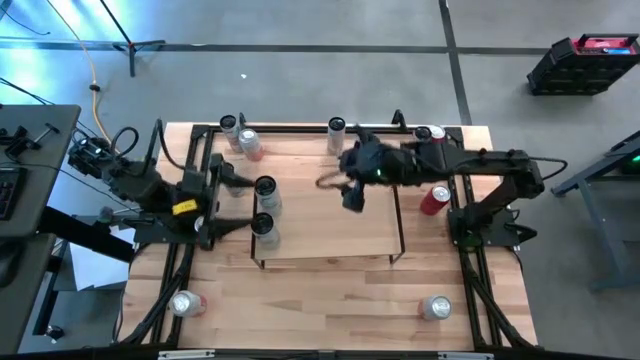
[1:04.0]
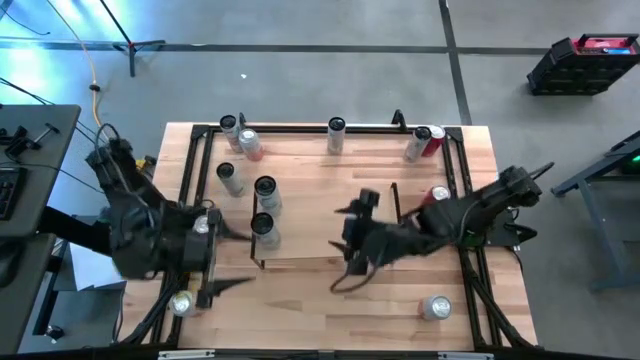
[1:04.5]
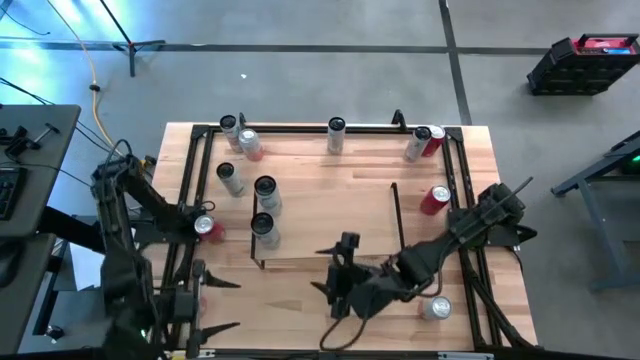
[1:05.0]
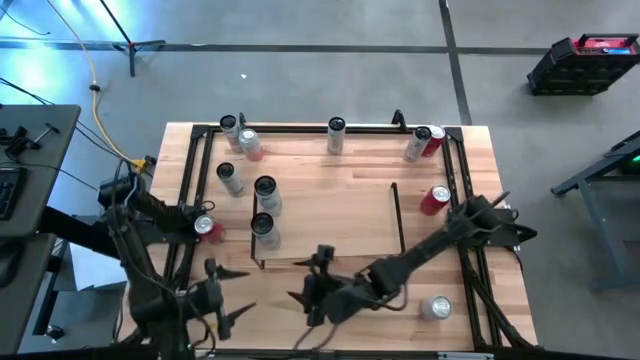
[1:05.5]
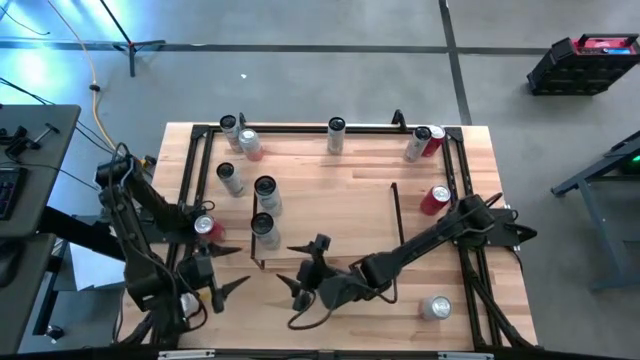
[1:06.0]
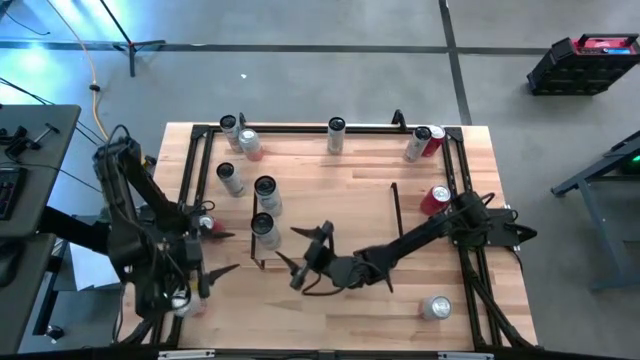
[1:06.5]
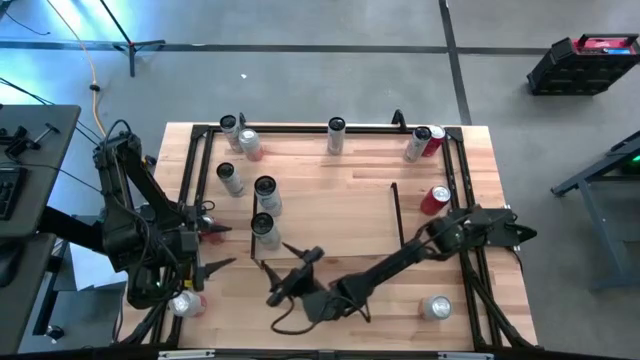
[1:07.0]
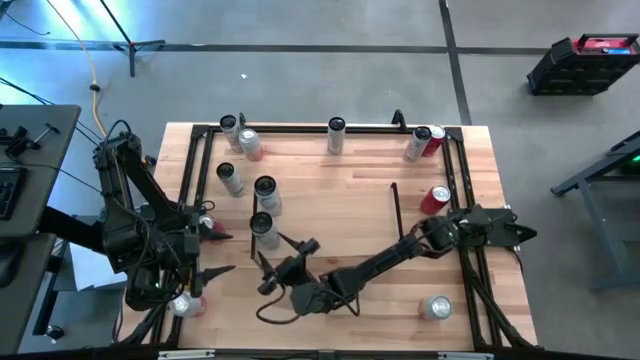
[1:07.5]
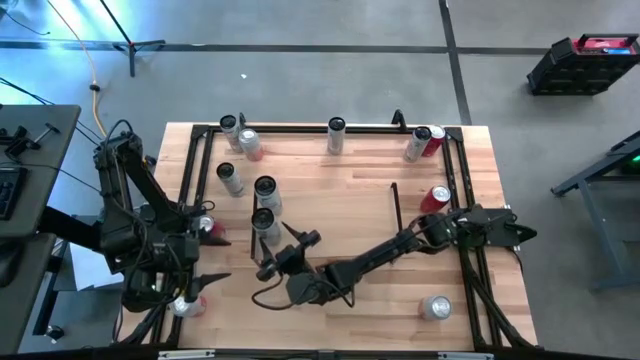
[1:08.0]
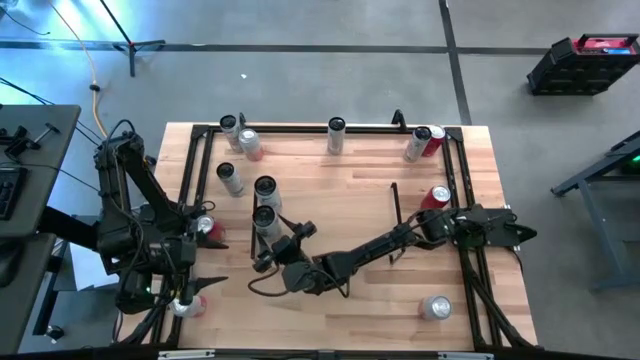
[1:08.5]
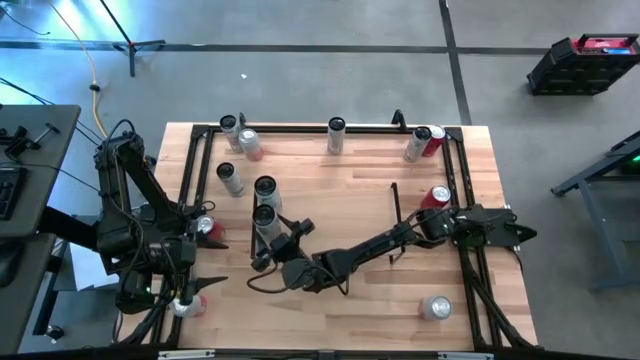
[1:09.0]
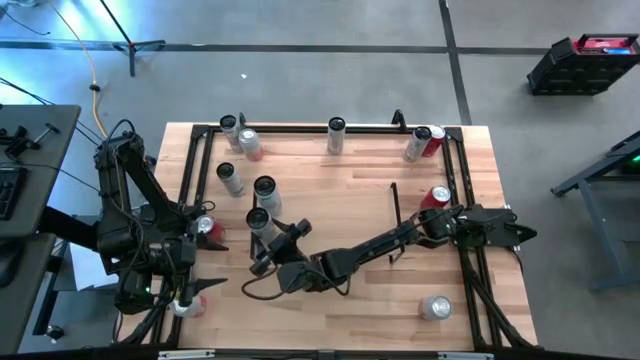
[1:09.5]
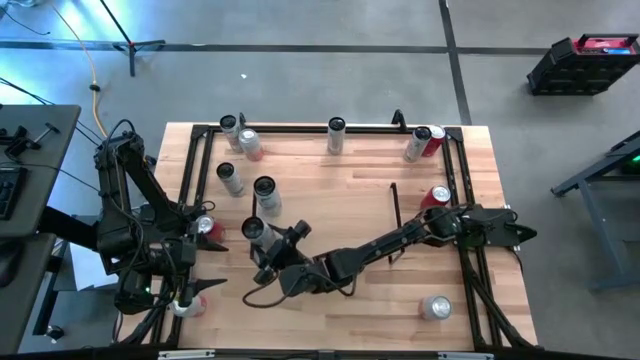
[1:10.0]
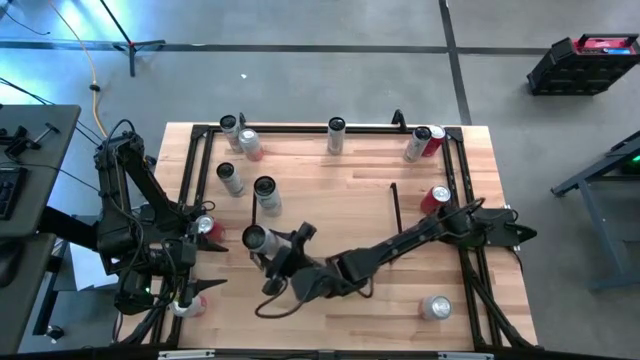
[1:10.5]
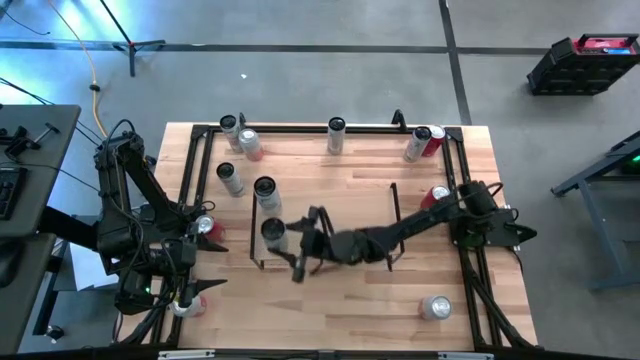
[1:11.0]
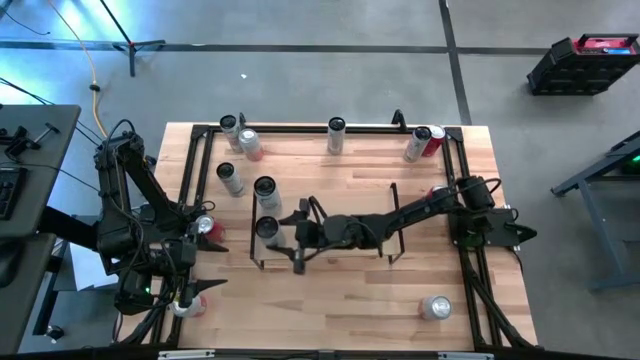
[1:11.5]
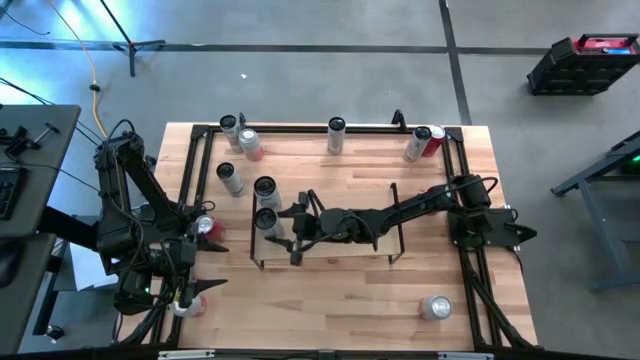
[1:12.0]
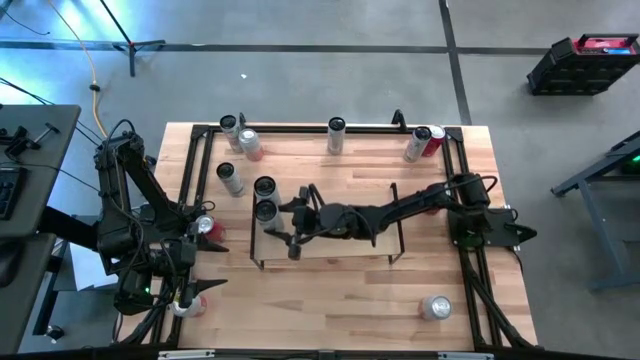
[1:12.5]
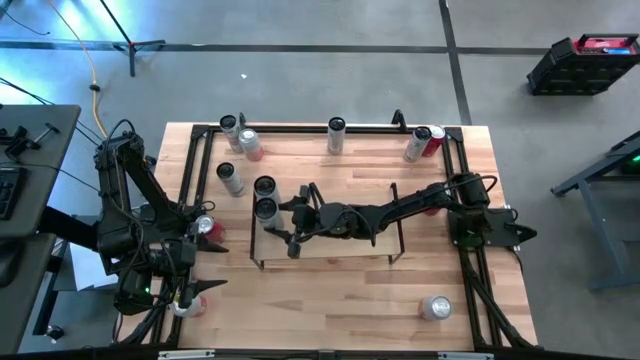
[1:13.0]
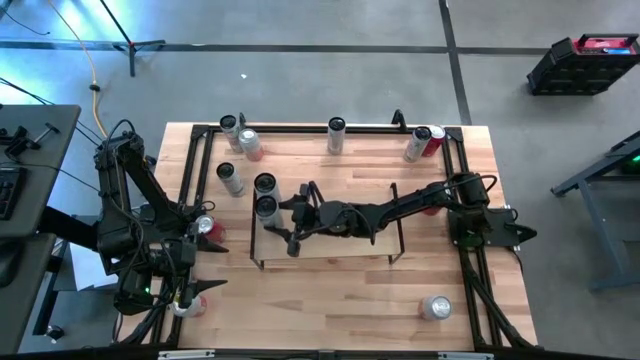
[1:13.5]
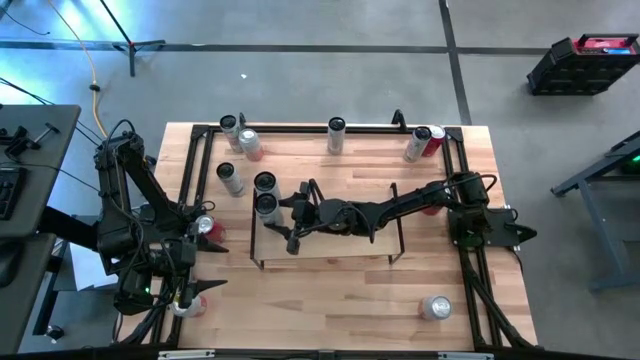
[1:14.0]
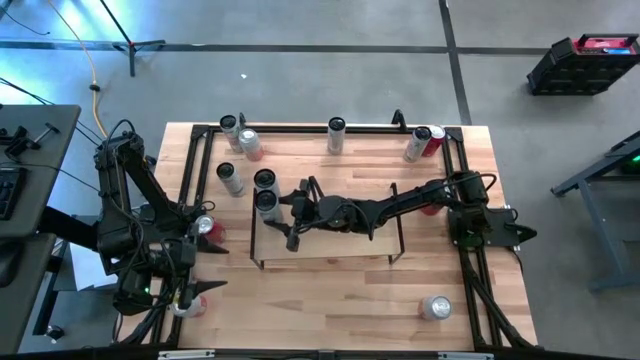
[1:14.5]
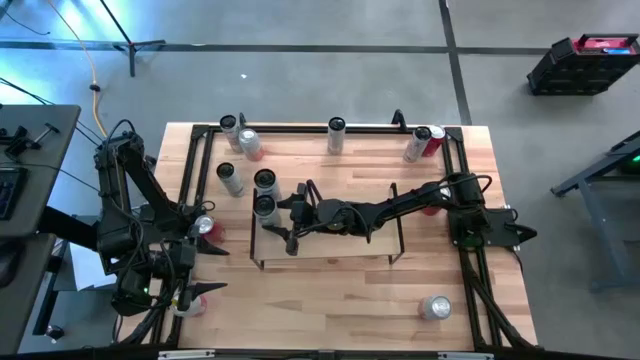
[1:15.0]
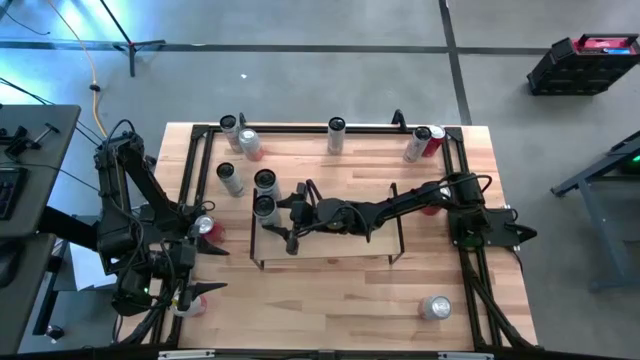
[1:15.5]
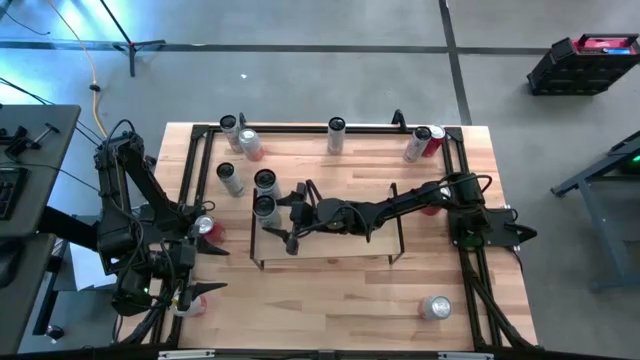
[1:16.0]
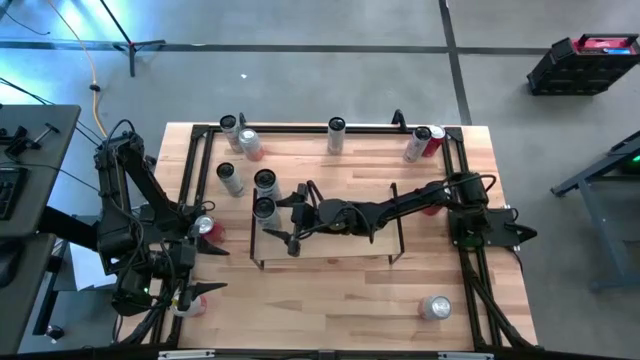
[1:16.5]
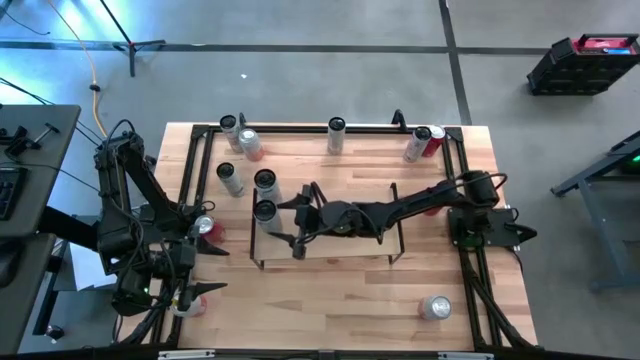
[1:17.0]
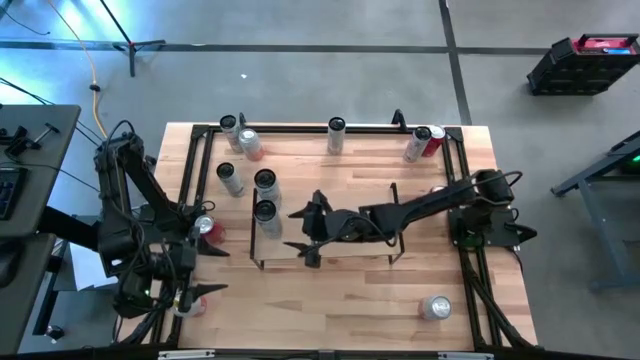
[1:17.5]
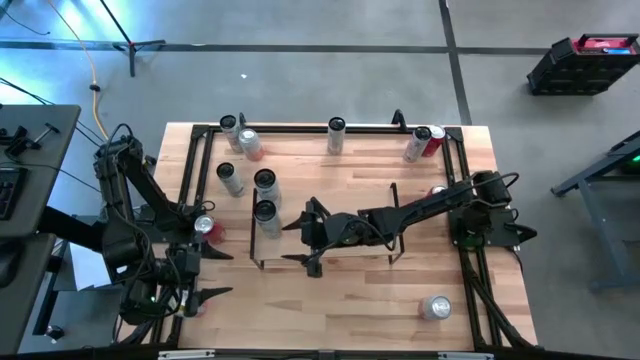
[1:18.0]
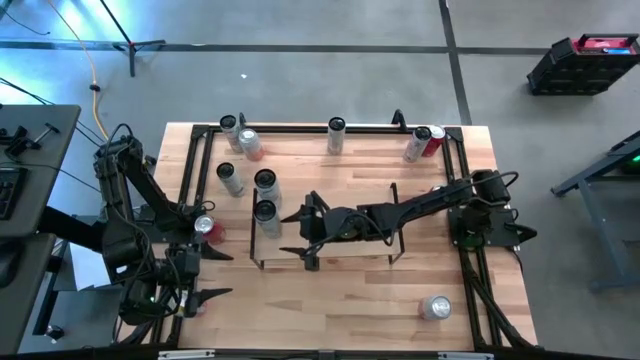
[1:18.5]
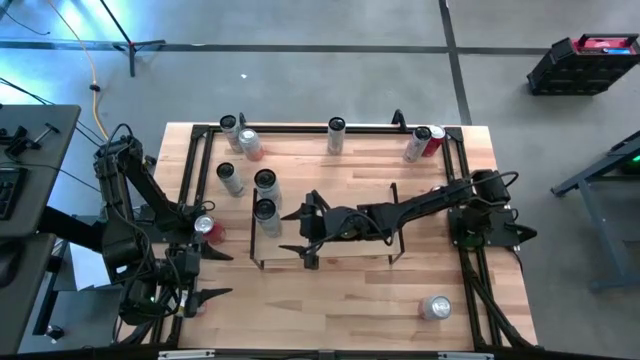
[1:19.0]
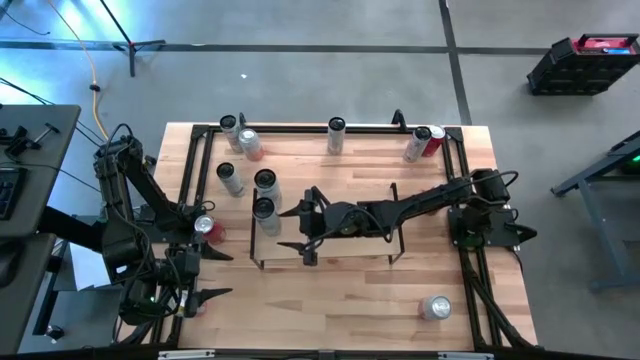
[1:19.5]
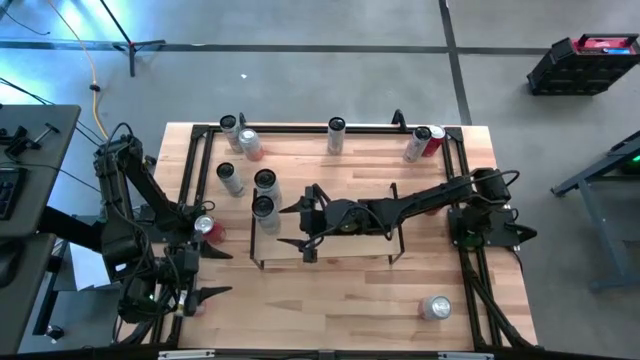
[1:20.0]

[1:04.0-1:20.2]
Task: Place canned beverage on shelf
Put the bottom white blue soda can aligned with the other white blue soda can on the shelf

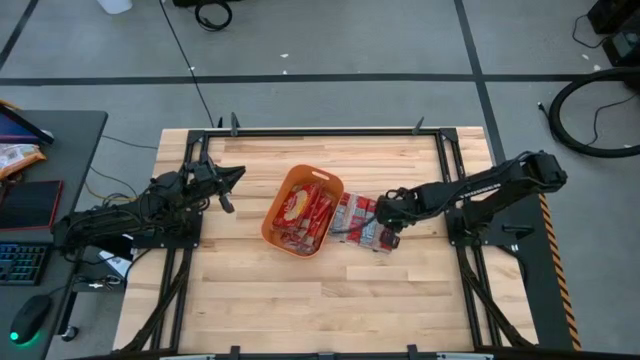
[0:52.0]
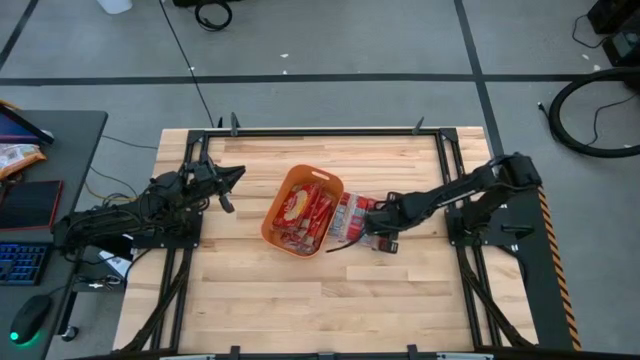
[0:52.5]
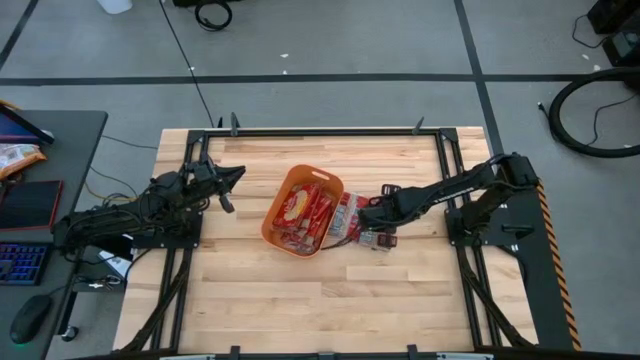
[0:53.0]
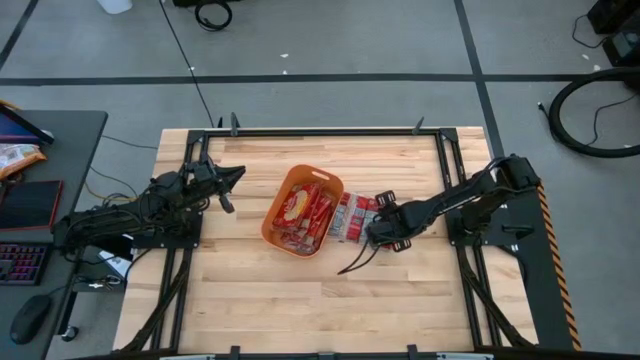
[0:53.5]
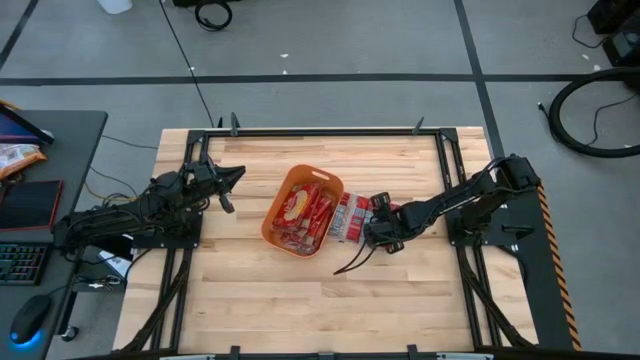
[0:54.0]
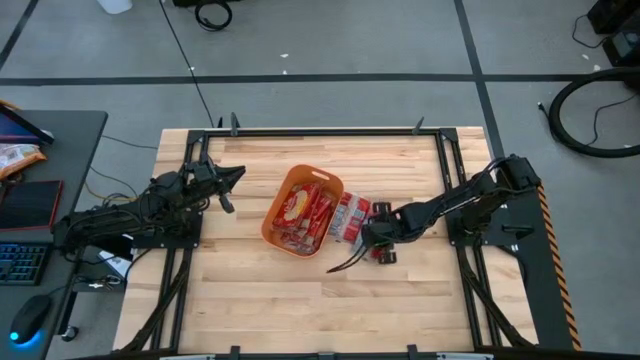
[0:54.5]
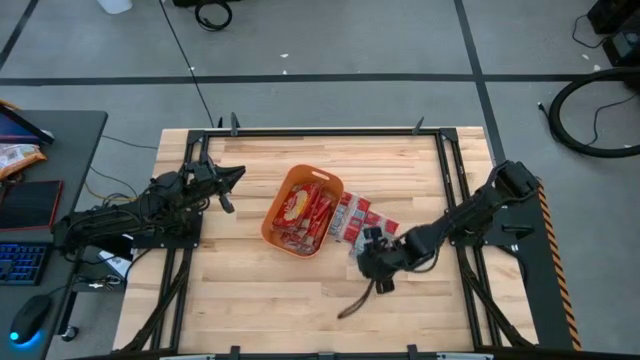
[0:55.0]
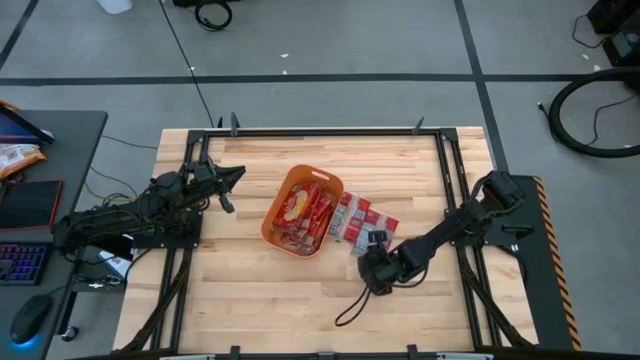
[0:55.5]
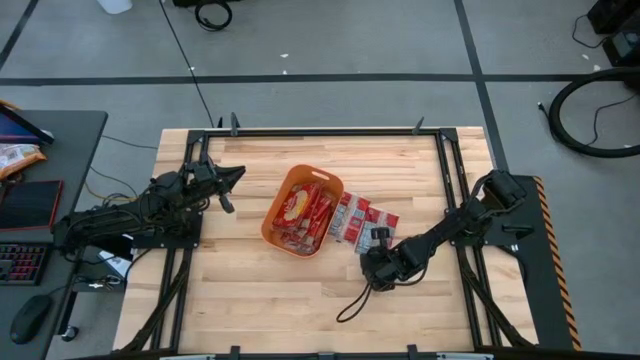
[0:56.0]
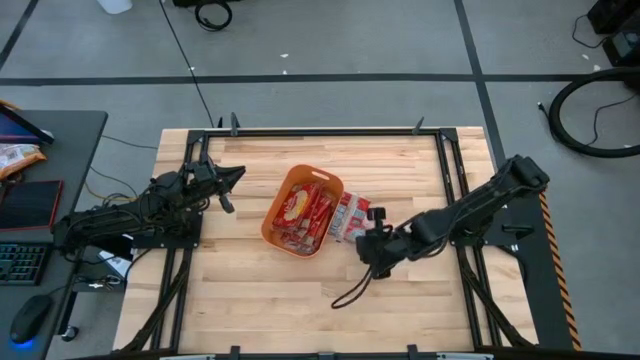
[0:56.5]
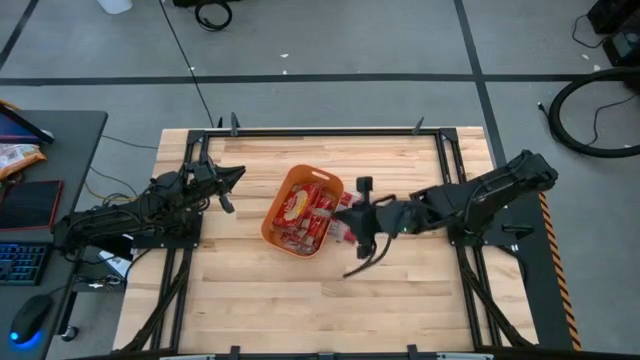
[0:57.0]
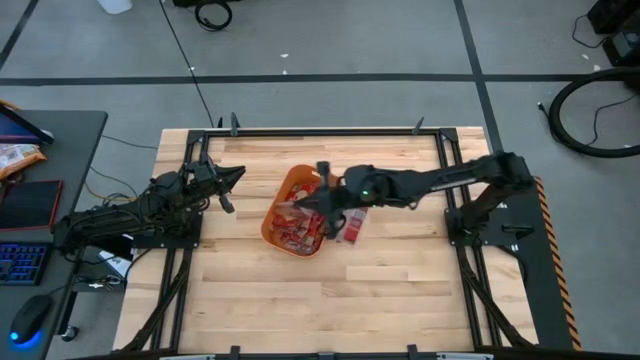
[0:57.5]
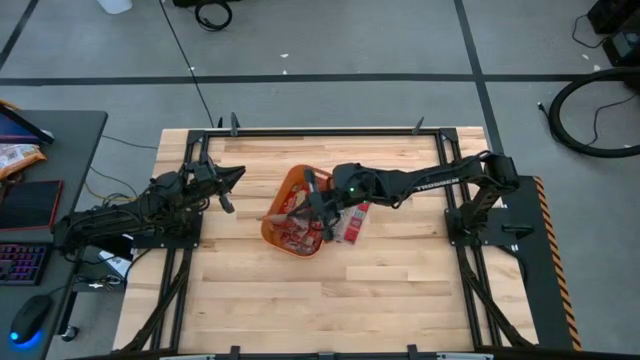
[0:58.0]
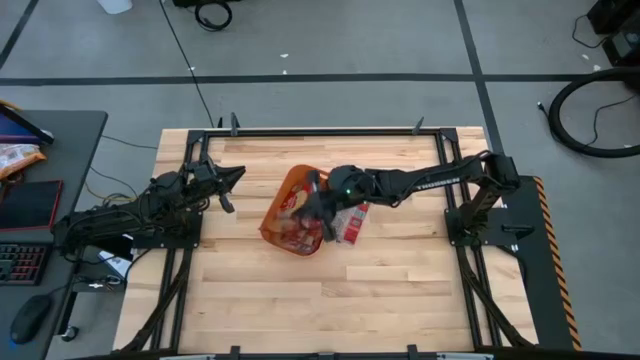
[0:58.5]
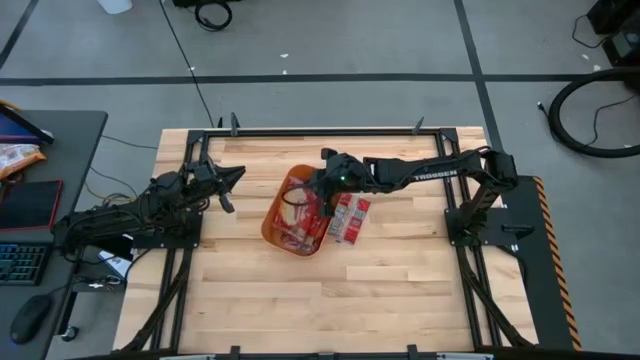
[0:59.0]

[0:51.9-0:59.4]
Task: Sort popcorn bags into baskets
Put the red popcorn pack into the orange bin
